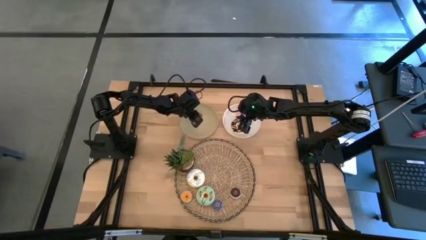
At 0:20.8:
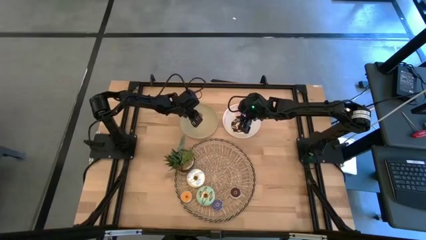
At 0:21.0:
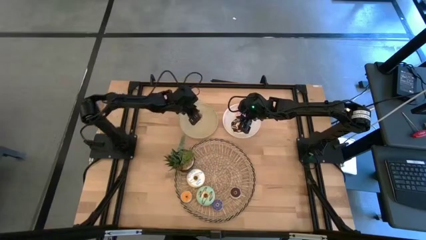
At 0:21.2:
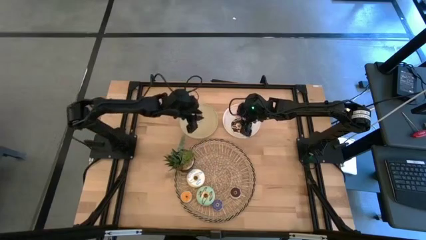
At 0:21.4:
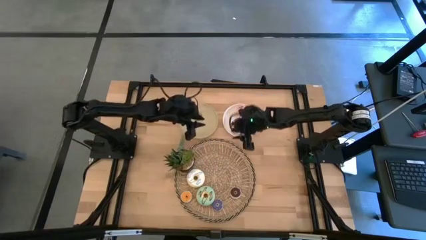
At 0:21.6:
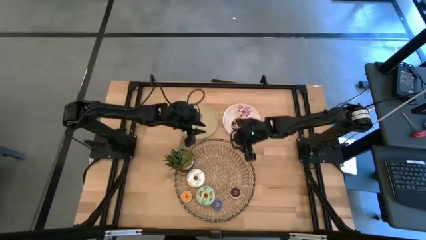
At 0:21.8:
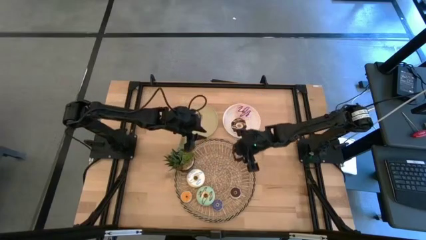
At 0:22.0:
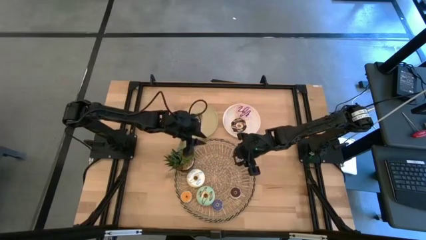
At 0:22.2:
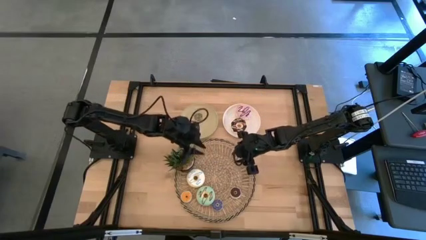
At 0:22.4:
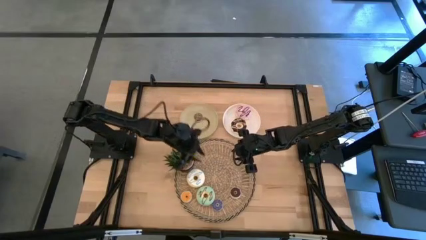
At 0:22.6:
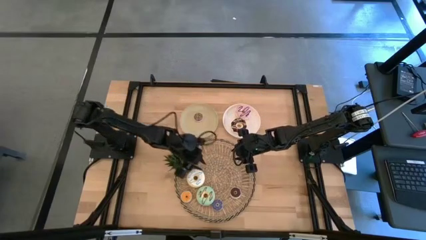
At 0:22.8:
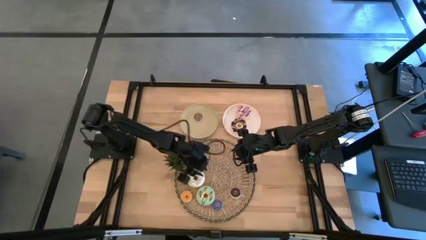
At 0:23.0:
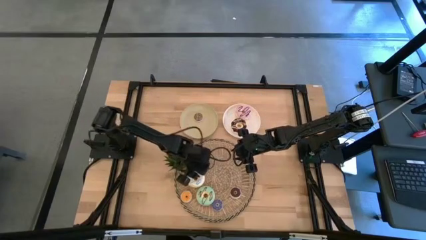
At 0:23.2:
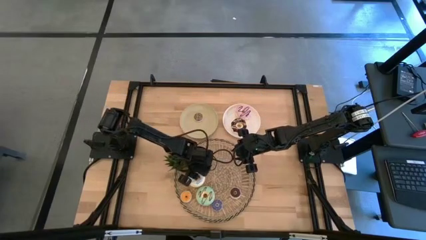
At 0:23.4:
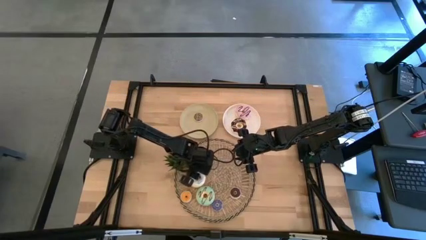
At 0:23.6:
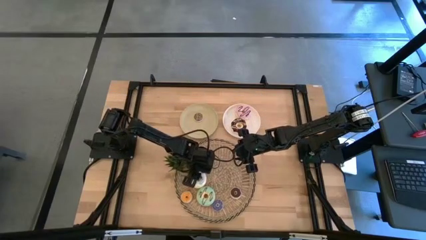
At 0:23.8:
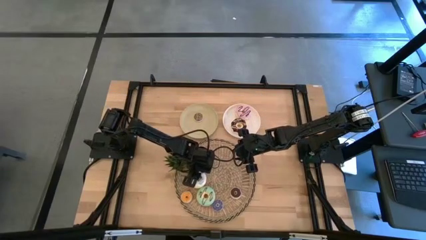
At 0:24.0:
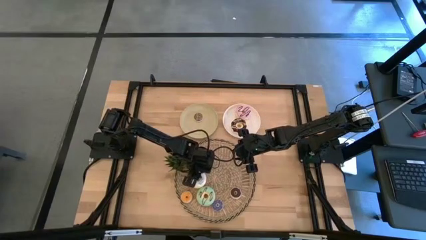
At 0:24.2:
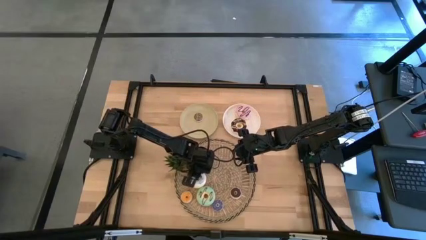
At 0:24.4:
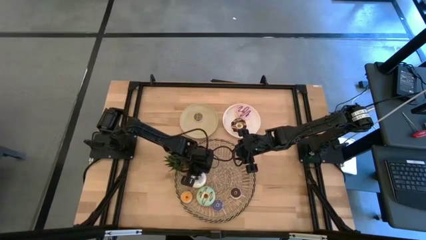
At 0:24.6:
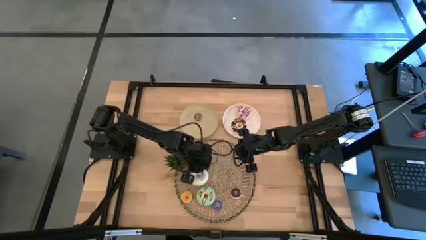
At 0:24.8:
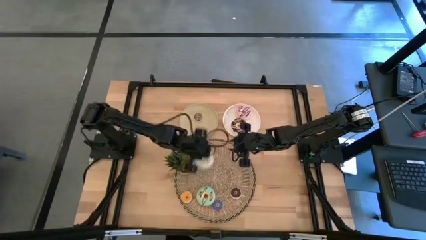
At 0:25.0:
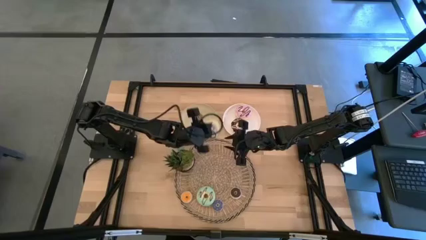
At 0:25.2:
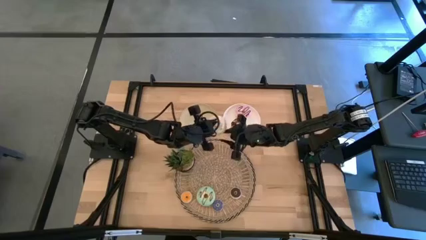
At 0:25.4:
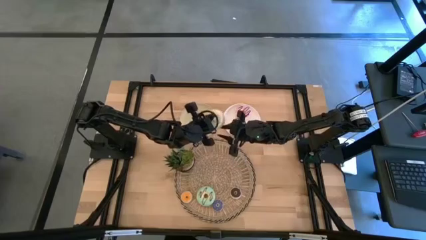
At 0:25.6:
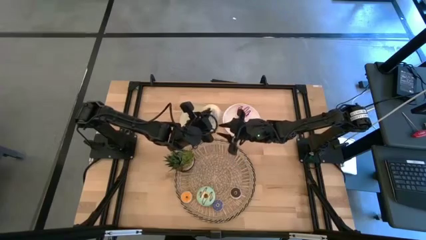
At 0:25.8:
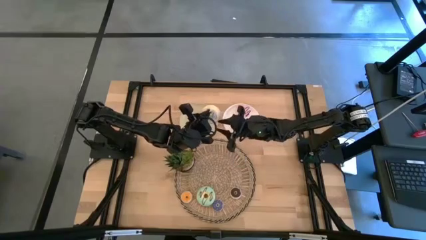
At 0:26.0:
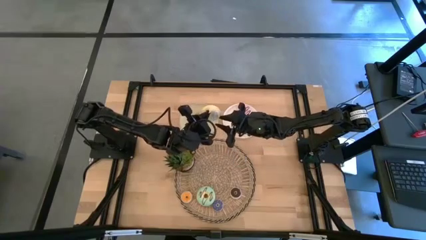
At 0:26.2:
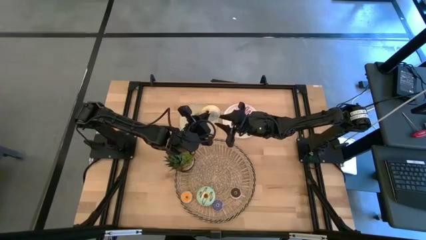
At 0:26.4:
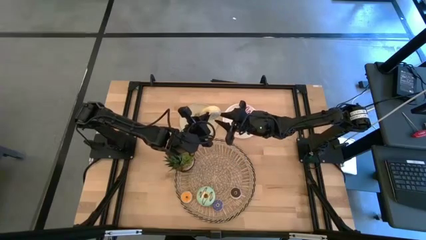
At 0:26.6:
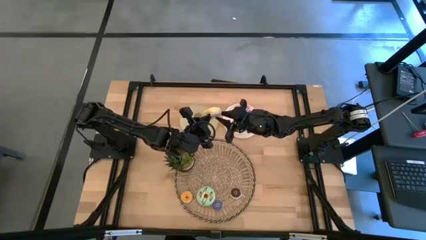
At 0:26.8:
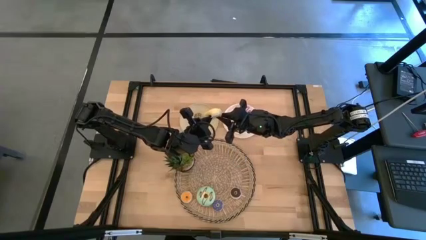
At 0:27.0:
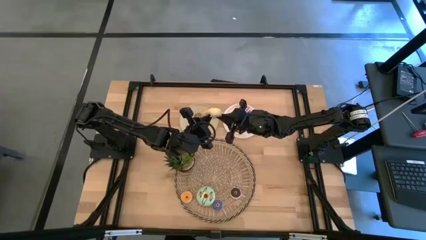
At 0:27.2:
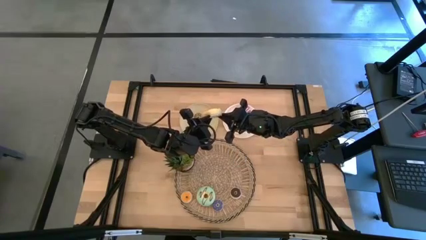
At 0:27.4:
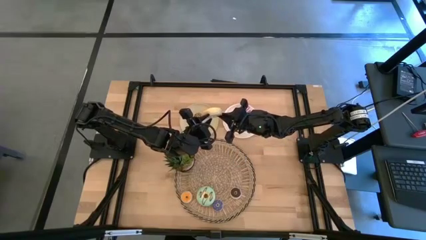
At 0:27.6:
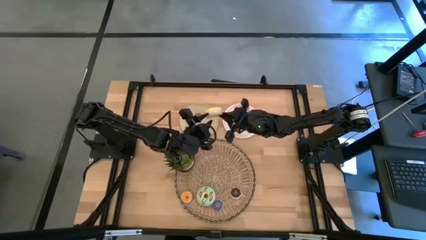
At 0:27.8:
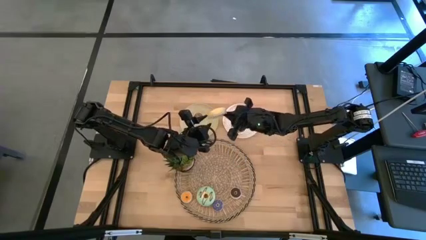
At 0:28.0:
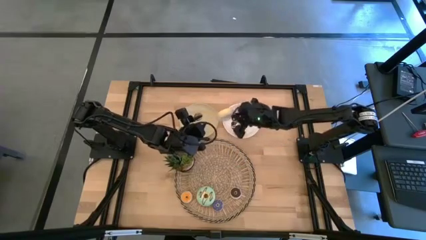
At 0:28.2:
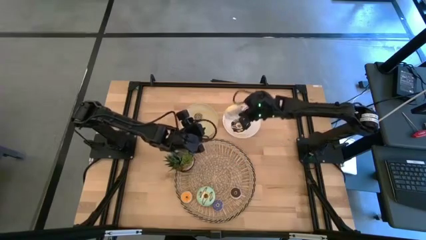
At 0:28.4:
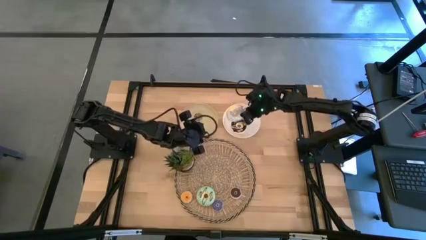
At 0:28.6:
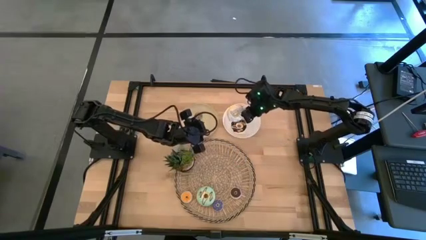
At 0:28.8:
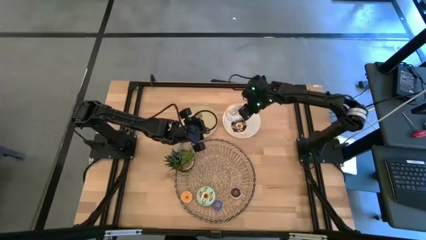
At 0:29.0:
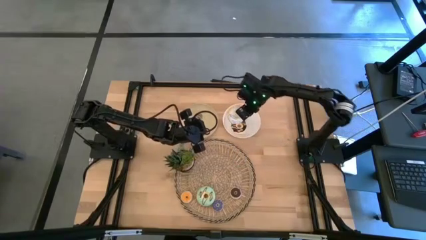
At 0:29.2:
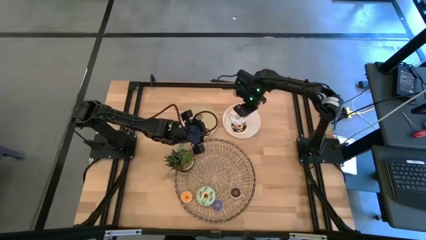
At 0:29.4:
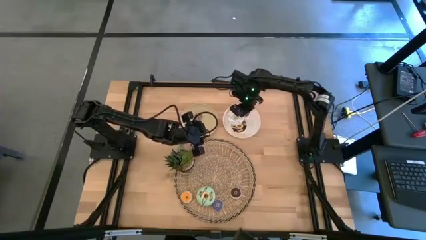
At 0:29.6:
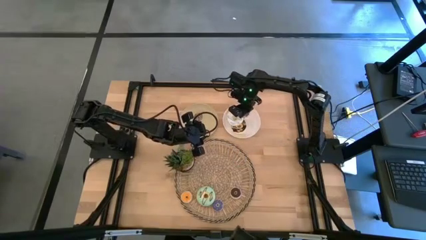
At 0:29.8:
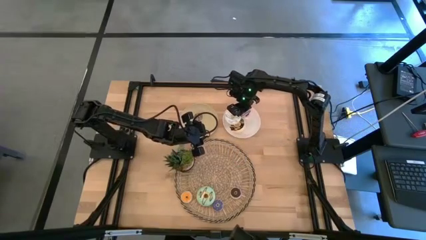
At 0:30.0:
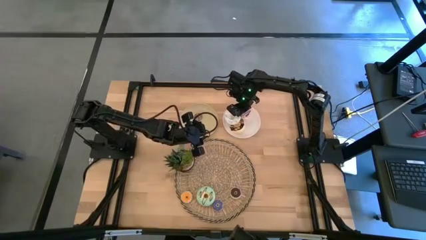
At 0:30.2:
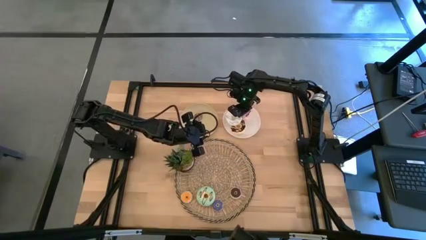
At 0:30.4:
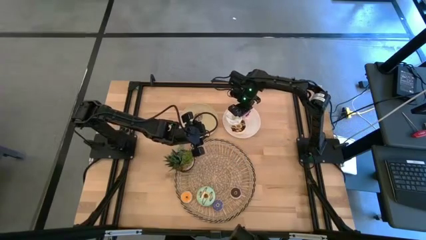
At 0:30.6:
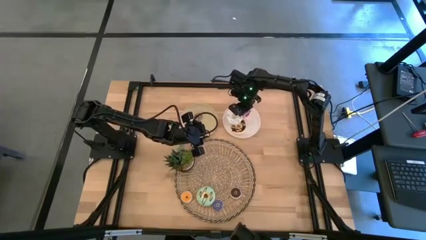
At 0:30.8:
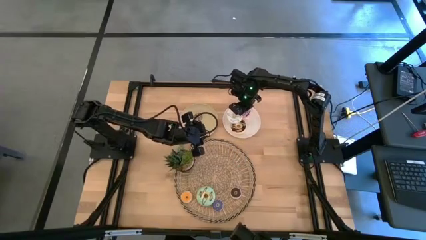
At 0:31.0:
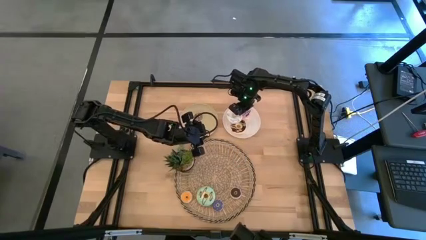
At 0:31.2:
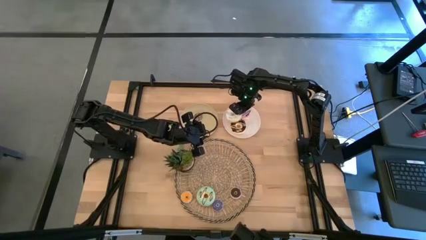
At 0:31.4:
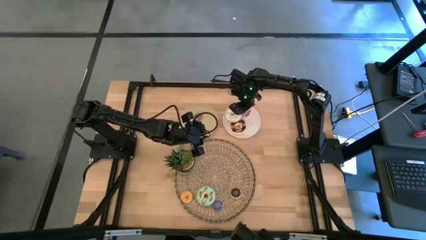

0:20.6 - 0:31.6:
Task: Pick & Place donuts
Put the large white donut on the white plate
